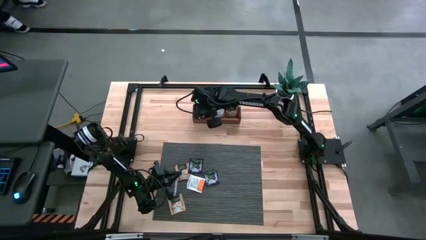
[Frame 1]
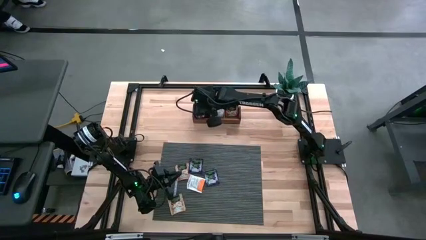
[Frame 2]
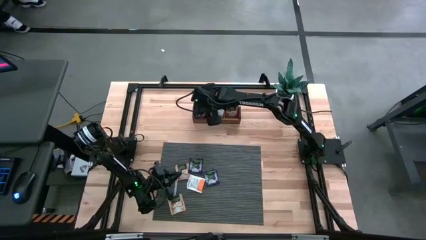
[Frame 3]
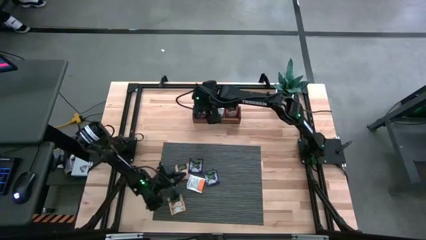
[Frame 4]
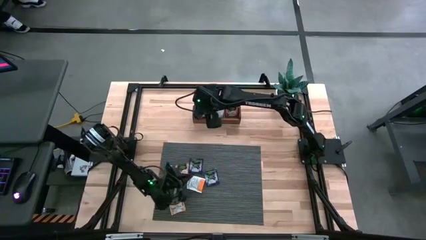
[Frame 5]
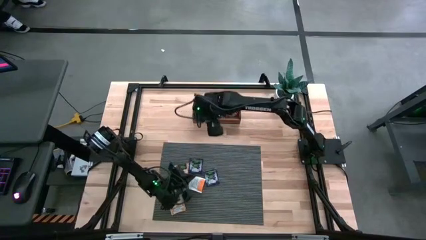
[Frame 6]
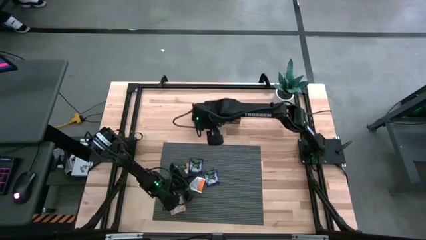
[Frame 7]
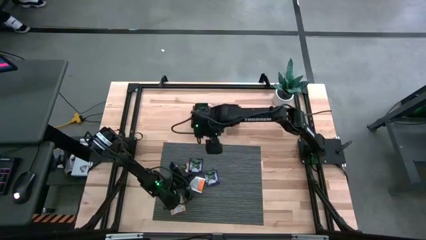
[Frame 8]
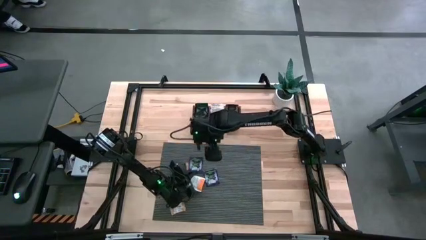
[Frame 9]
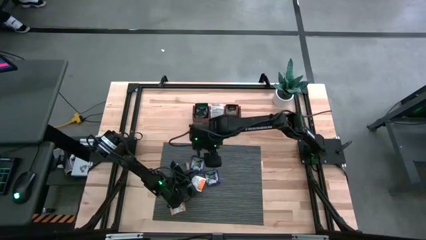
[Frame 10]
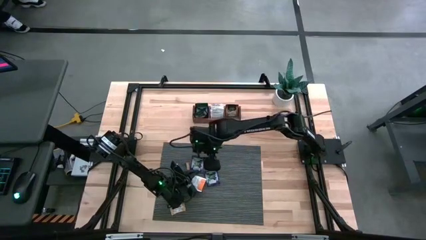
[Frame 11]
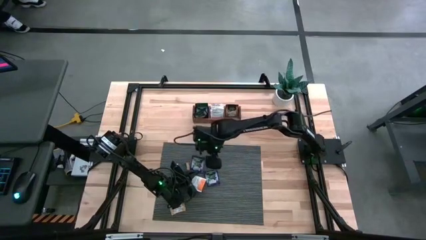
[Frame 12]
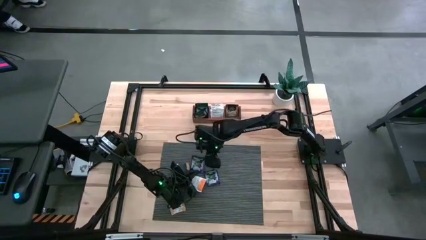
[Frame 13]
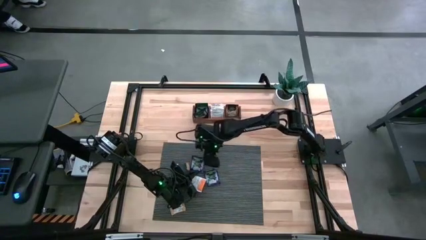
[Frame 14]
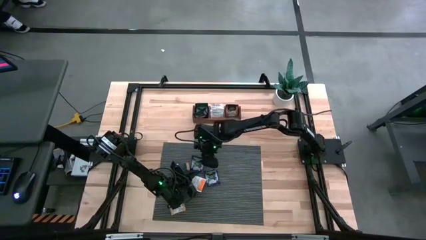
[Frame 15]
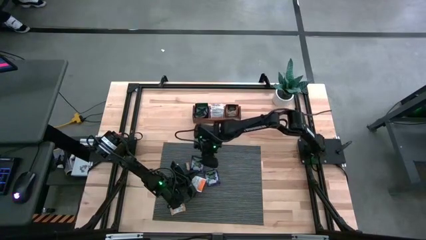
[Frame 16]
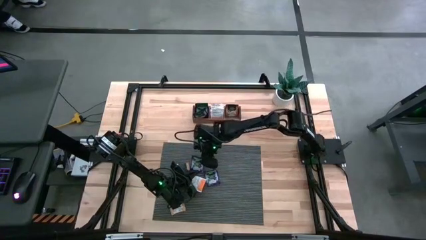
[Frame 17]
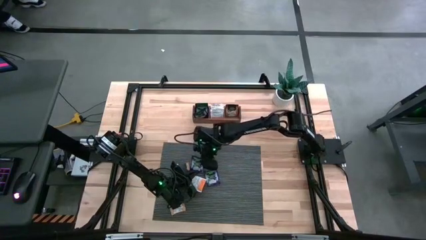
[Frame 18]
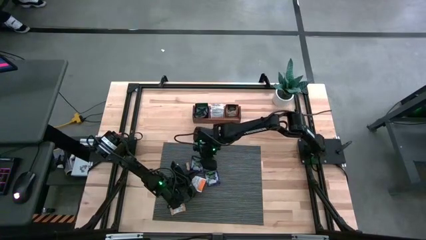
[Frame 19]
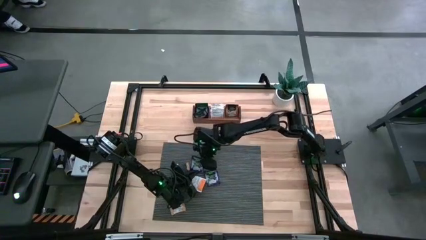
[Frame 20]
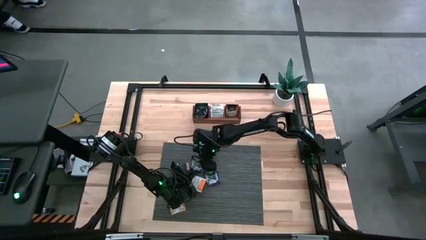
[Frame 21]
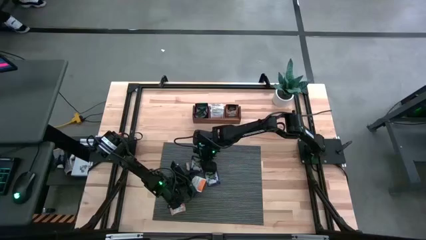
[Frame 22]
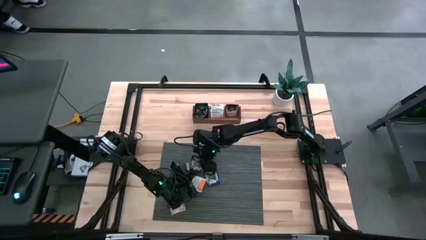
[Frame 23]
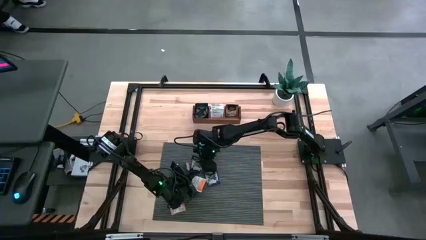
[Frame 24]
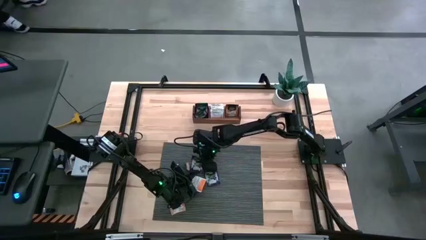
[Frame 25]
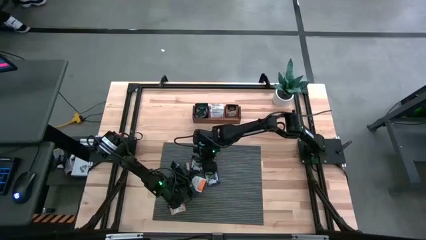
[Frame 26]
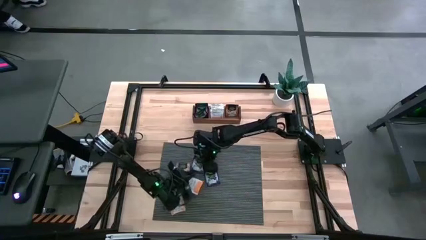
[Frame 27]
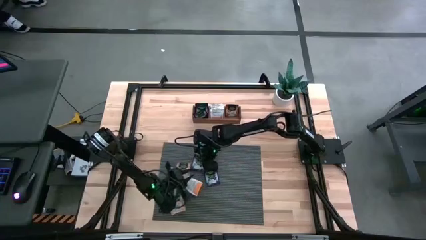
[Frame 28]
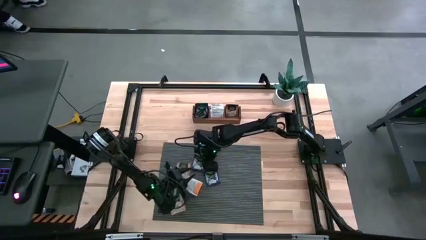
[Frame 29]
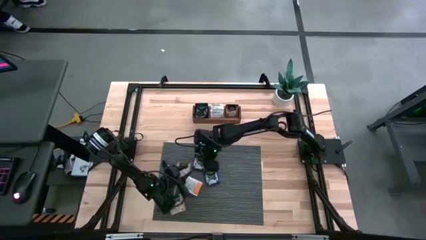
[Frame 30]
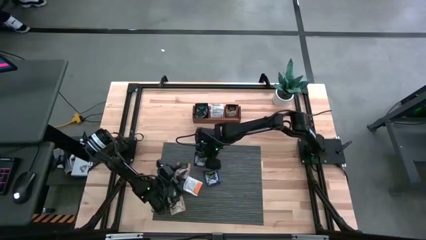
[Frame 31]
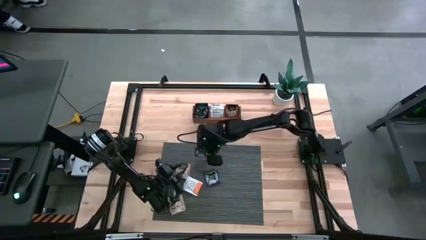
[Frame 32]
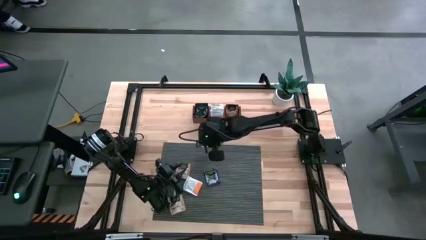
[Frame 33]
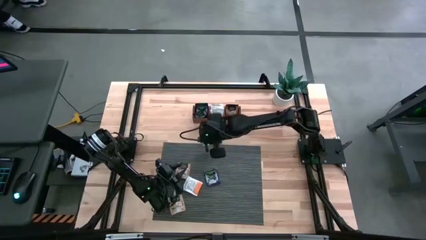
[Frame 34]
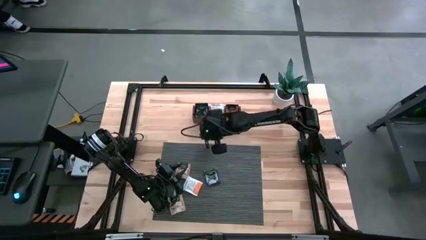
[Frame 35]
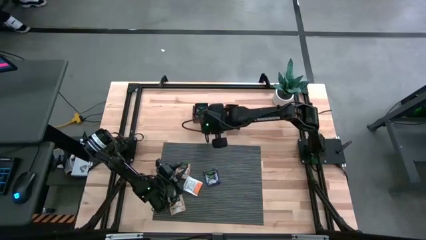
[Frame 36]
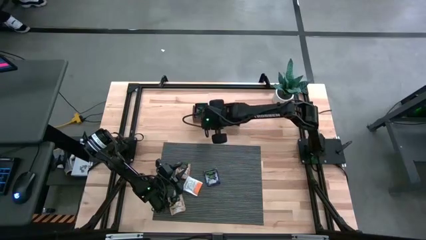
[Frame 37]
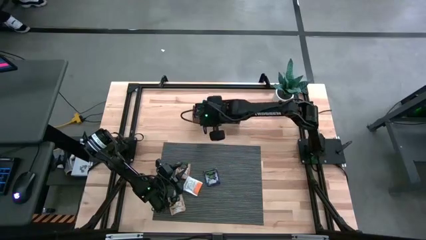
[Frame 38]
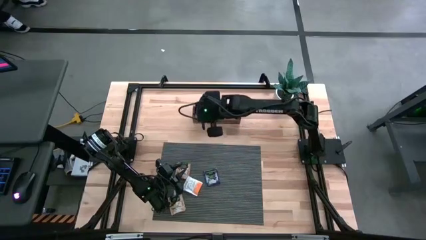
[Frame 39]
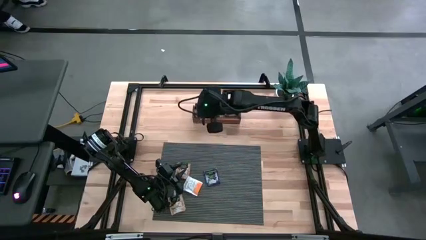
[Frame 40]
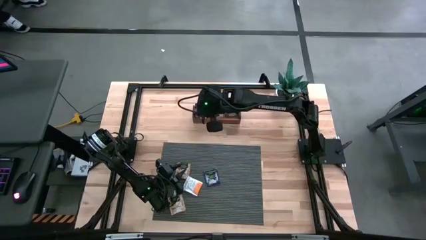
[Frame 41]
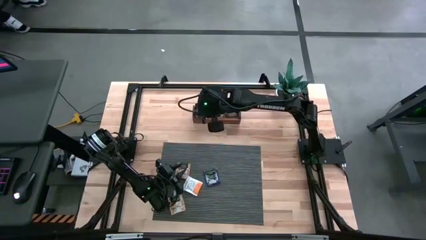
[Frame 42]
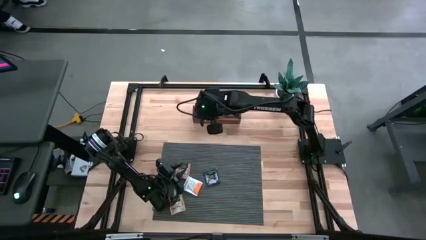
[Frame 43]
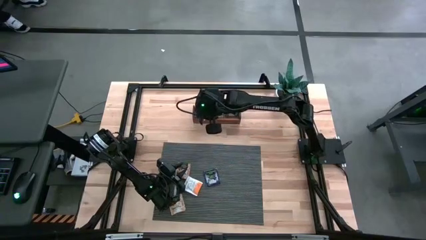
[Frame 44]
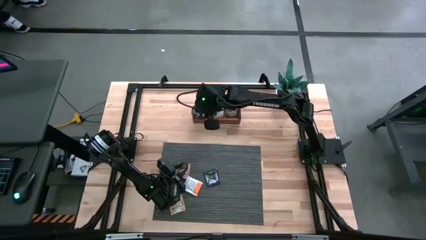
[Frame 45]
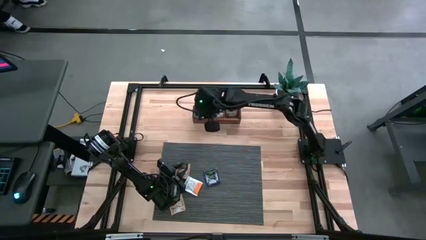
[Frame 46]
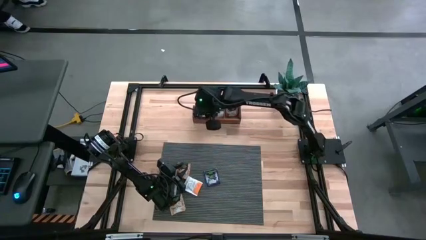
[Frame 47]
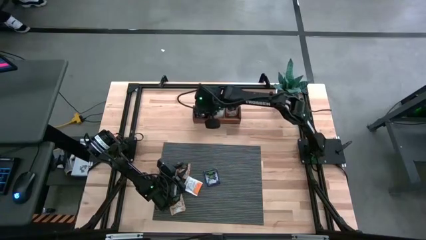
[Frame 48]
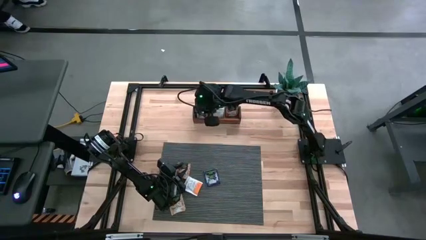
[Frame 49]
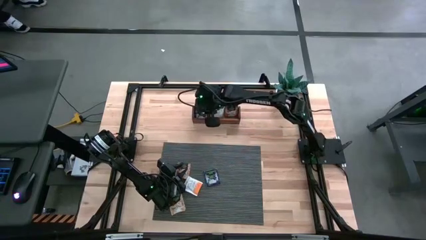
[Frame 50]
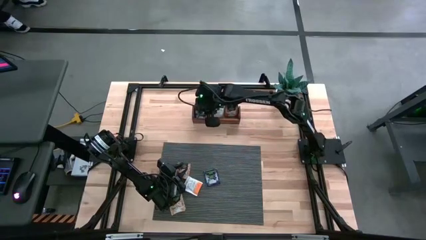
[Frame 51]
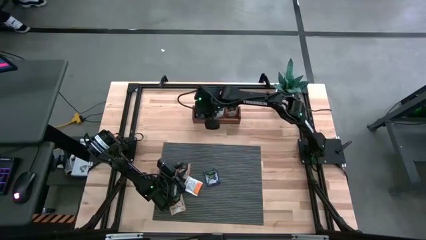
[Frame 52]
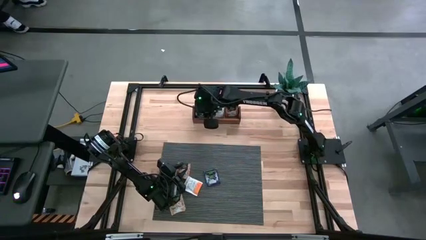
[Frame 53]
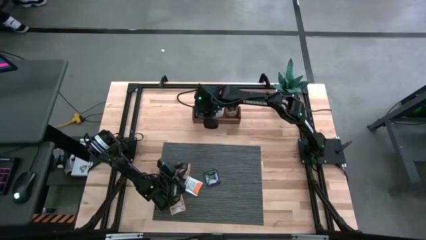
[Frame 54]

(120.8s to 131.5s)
Task: Pick & Place Tea
Put the purple tea bag into the left compartment of the wooden organizer

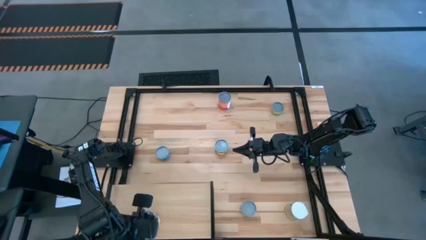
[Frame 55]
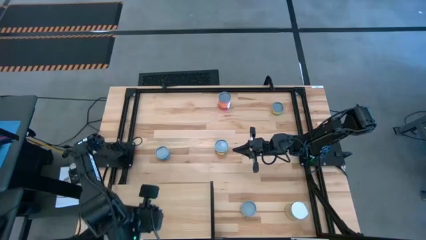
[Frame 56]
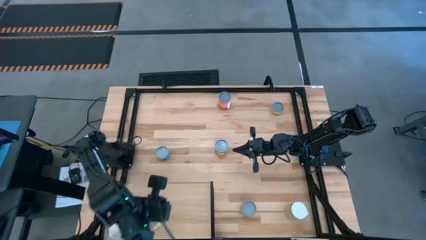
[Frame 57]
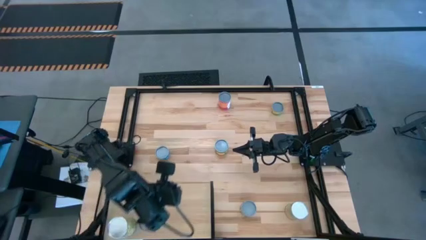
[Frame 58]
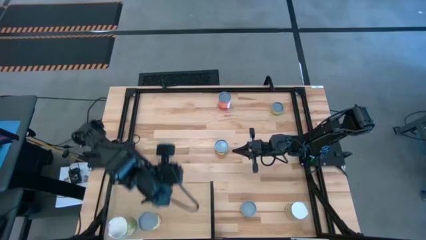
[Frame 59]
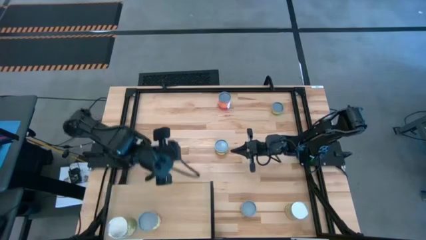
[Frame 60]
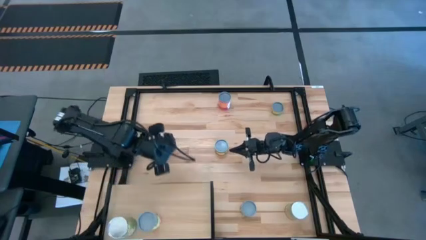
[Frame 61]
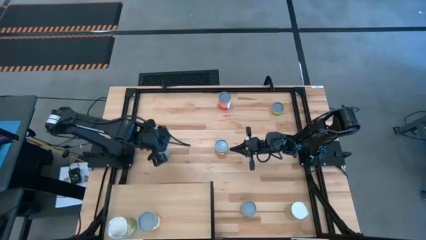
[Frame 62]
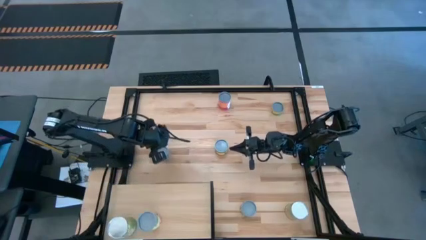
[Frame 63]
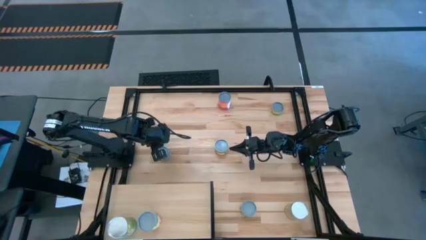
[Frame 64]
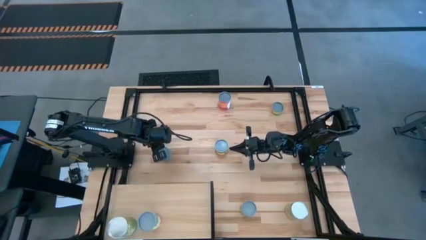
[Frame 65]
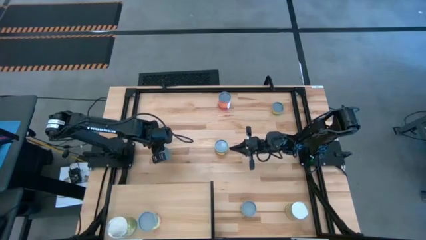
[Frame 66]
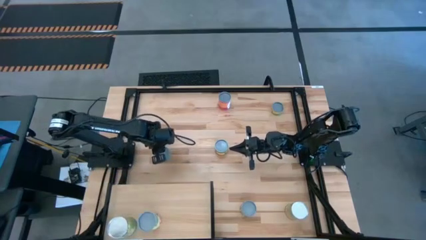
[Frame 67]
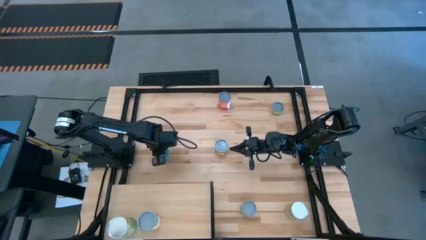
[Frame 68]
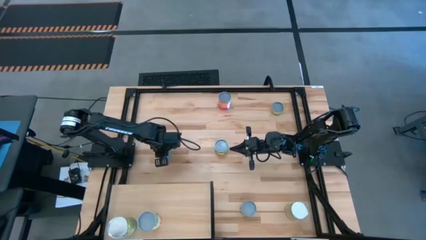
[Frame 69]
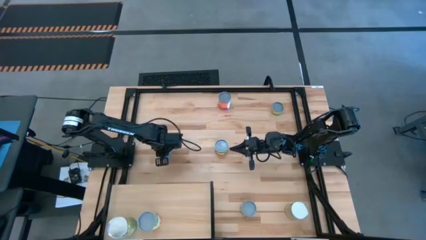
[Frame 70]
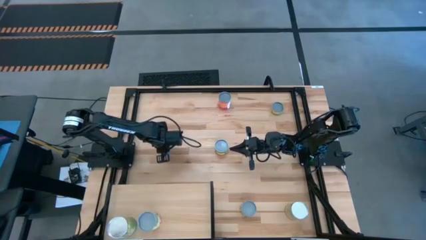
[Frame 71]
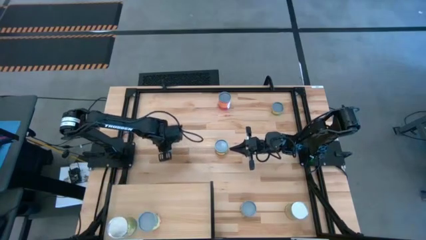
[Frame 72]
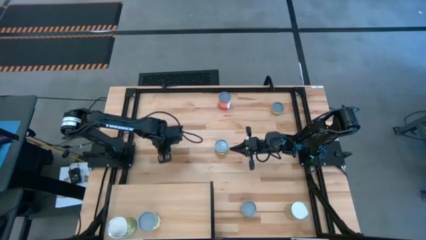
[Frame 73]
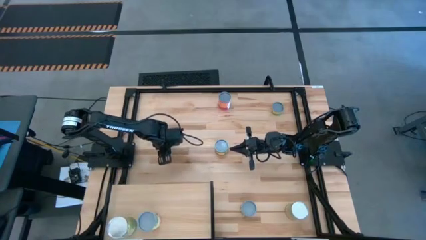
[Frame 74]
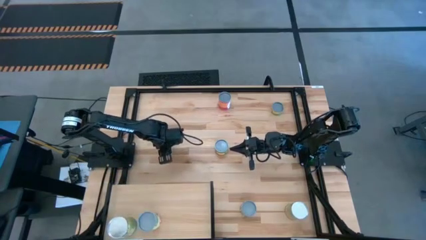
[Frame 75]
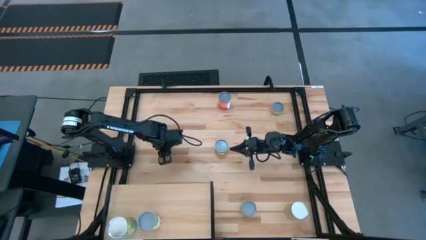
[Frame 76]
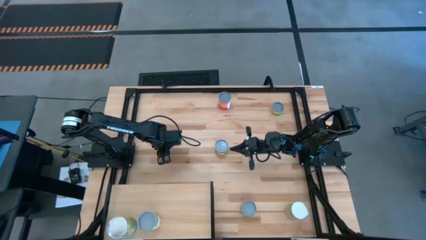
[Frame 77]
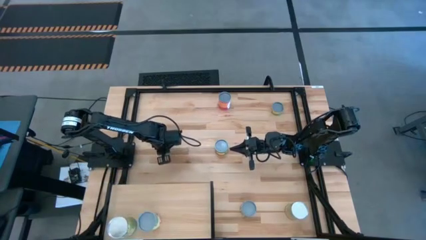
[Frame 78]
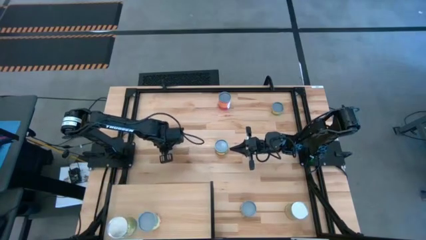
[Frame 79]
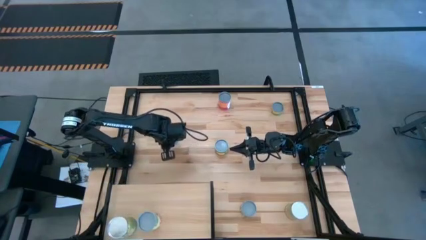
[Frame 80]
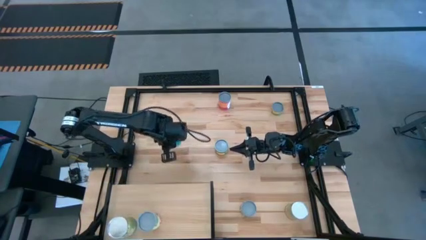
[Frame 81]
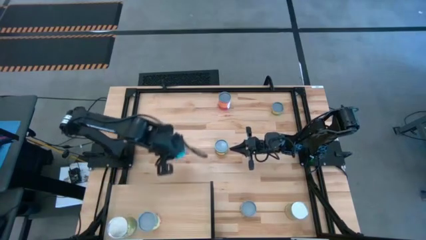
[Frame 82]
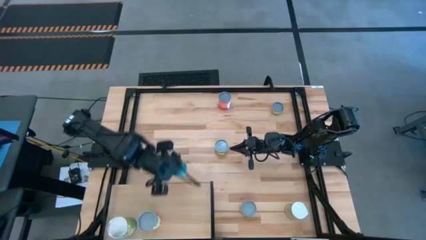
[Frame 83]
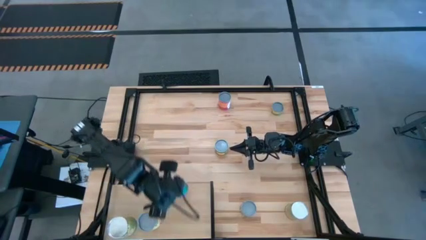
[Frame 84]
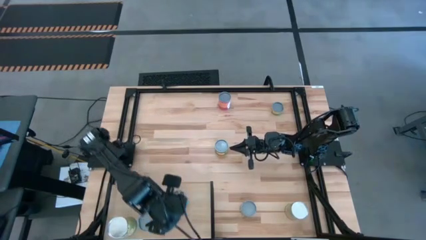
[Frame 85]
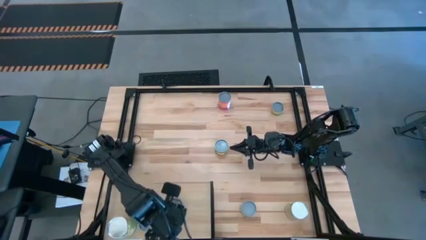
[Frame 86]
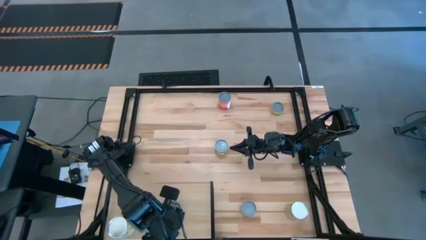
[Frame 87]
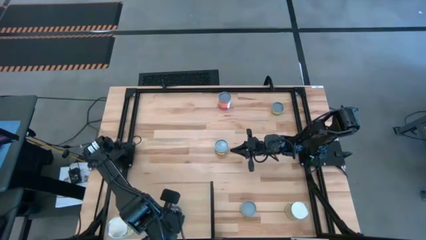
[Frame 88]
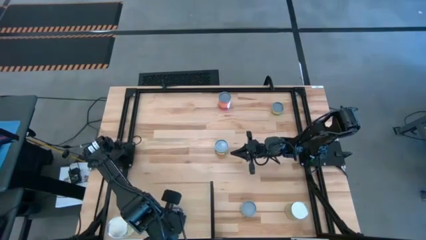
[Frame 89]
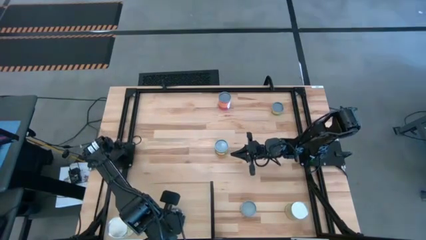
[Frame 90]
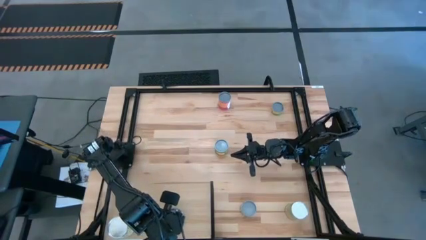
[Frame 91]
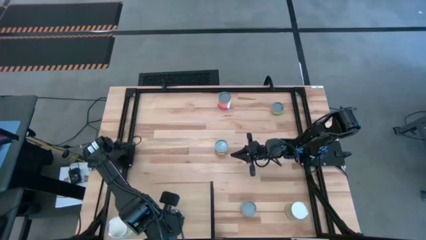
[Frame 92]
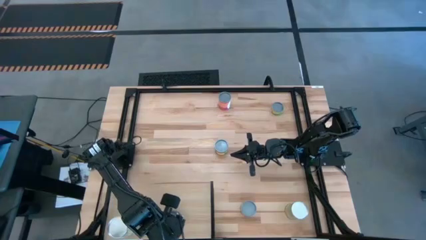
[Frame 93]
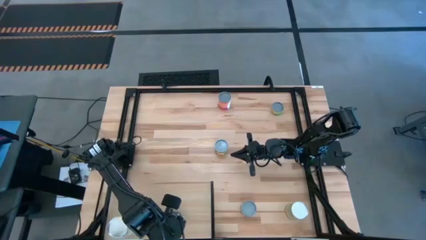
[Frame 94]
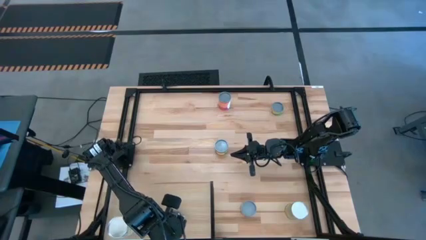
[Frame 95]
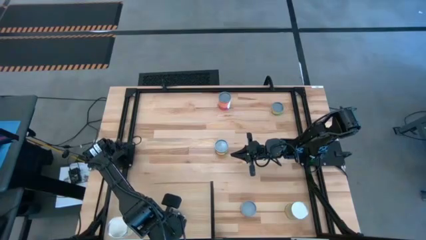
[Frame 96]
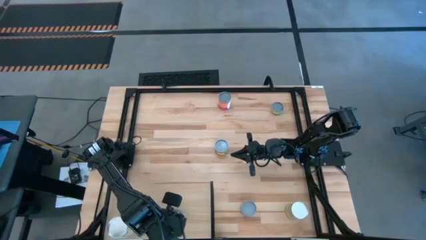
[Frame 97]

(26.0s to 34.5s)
Task: Pick and place cans onto a shelf
Put the canned tuna on the shelf
